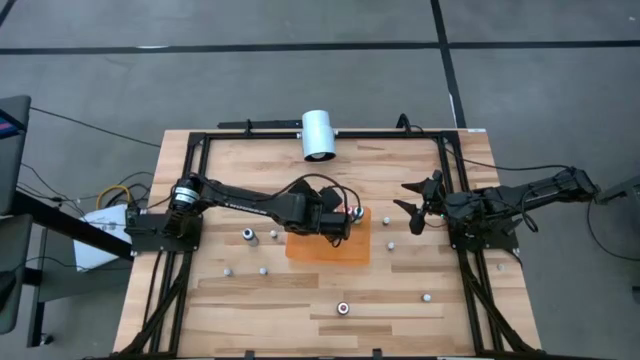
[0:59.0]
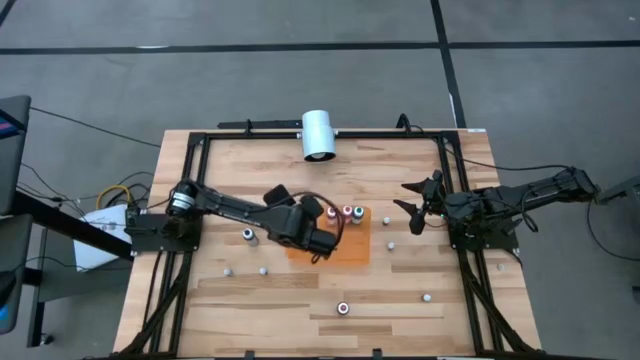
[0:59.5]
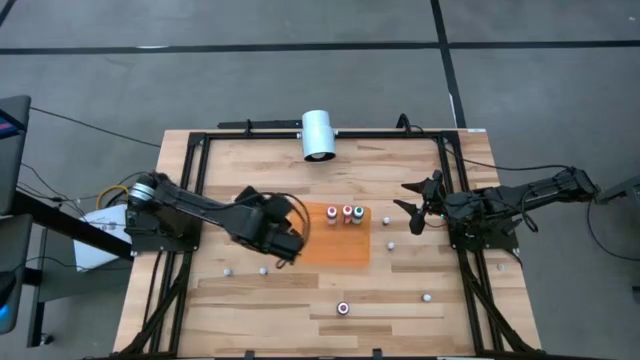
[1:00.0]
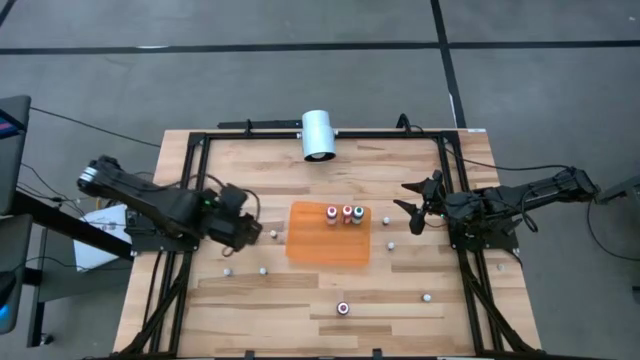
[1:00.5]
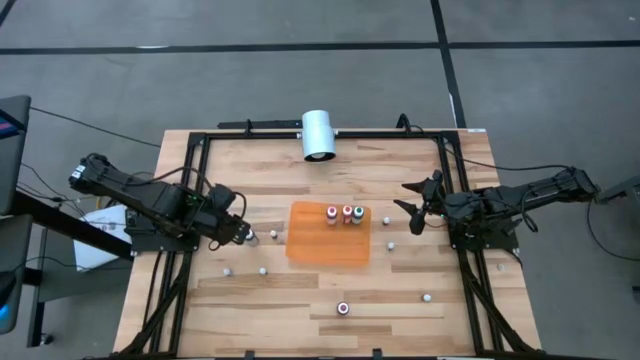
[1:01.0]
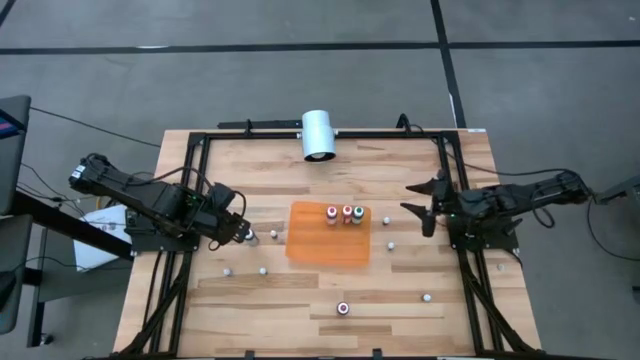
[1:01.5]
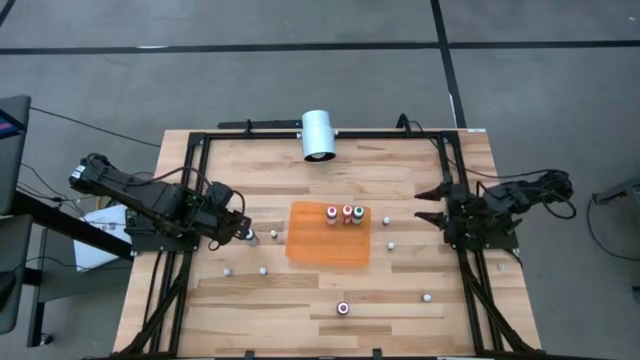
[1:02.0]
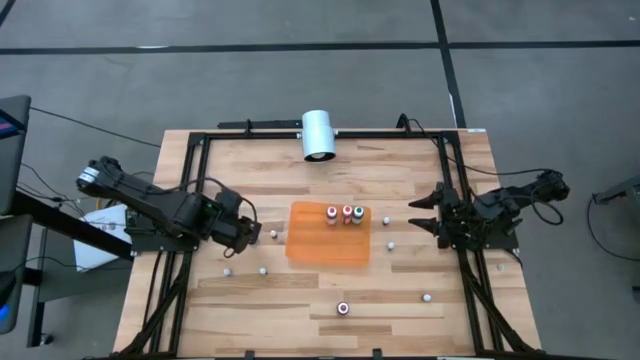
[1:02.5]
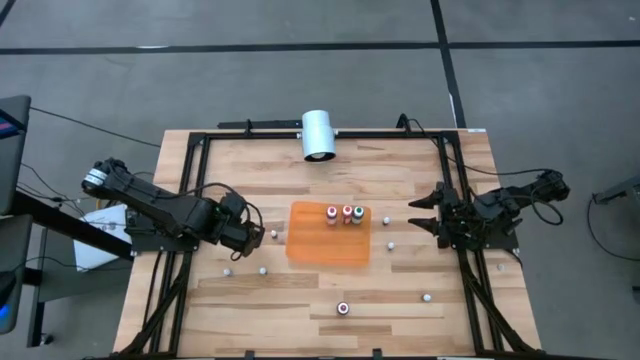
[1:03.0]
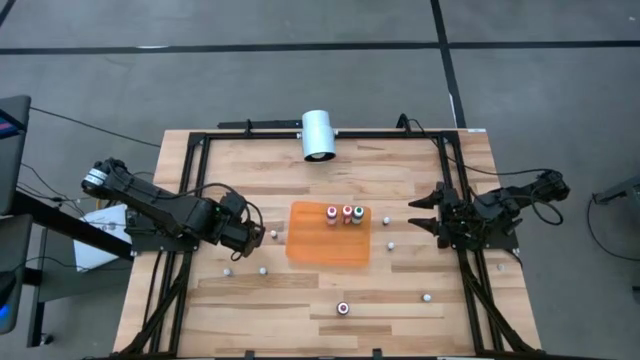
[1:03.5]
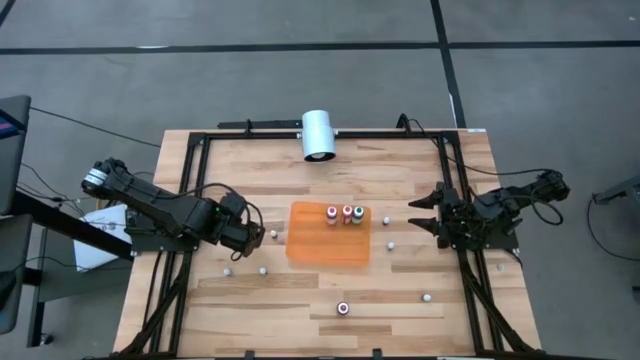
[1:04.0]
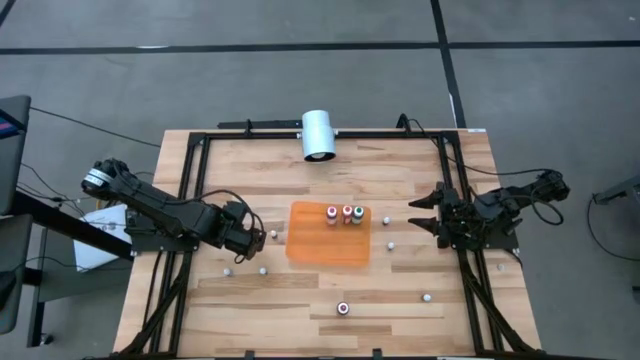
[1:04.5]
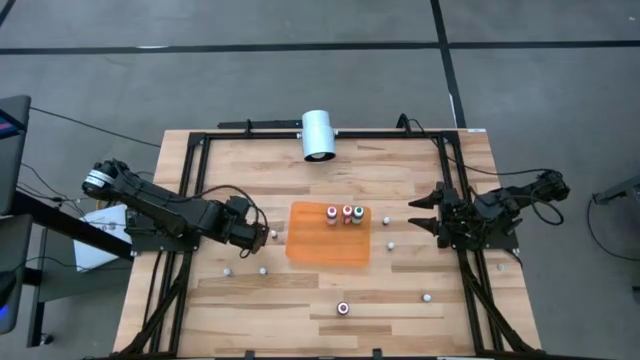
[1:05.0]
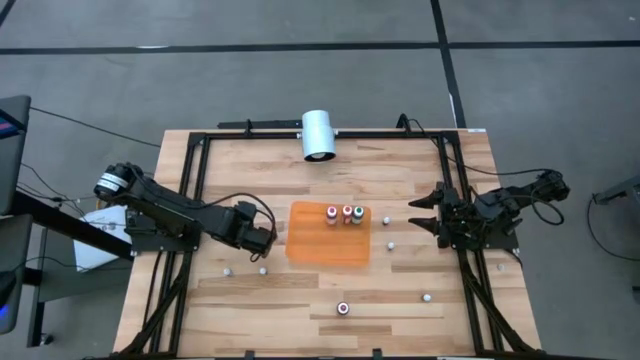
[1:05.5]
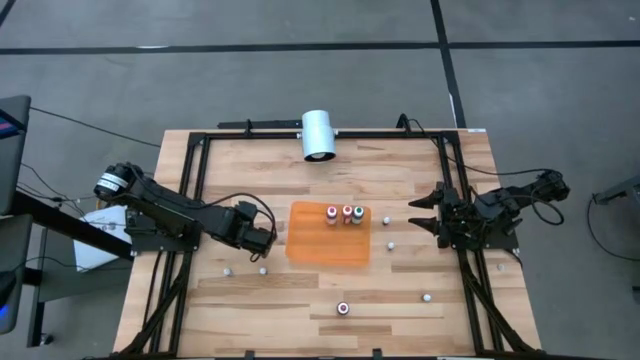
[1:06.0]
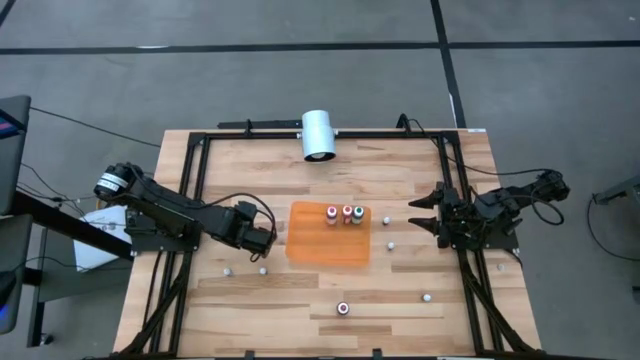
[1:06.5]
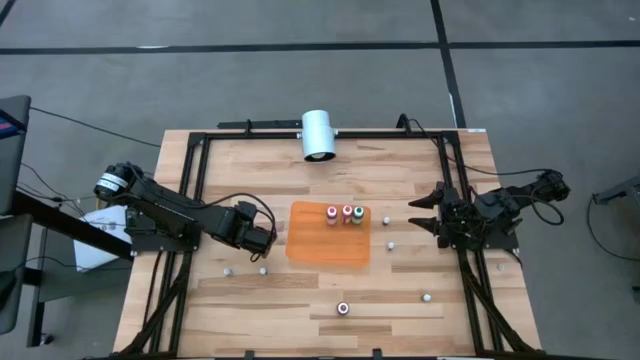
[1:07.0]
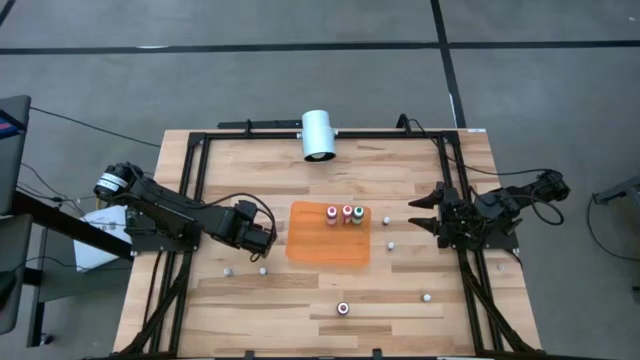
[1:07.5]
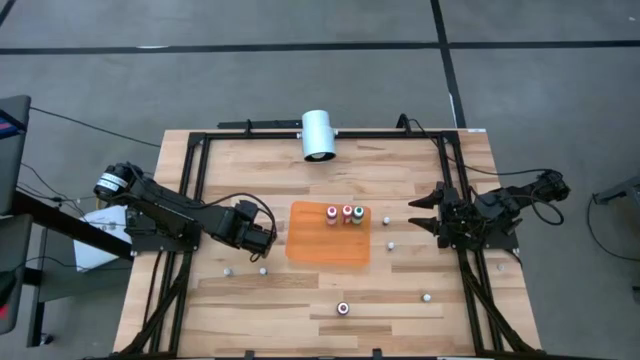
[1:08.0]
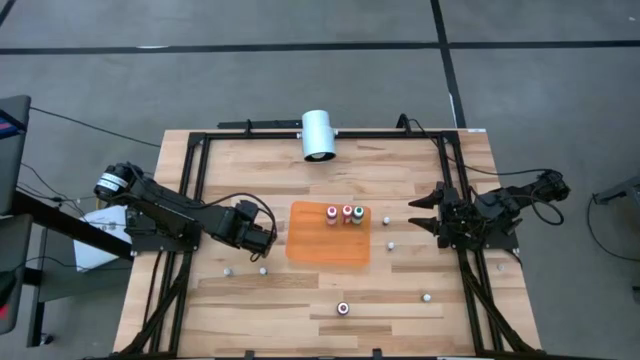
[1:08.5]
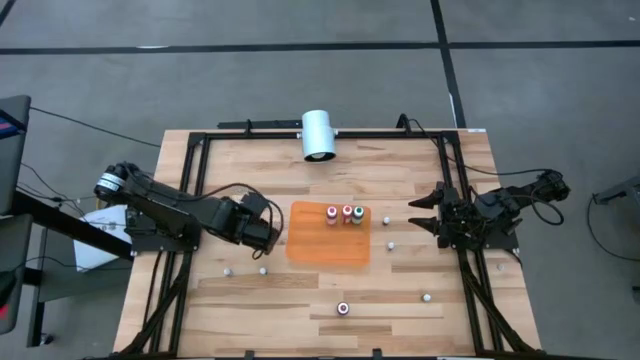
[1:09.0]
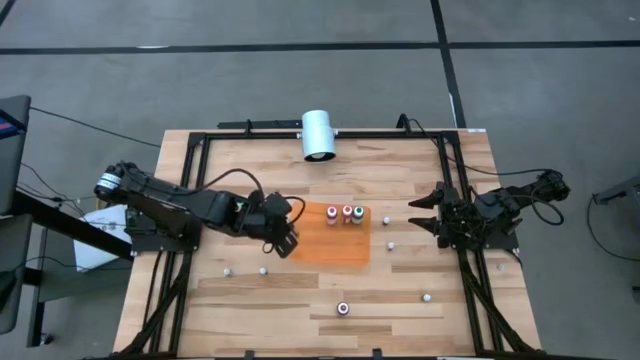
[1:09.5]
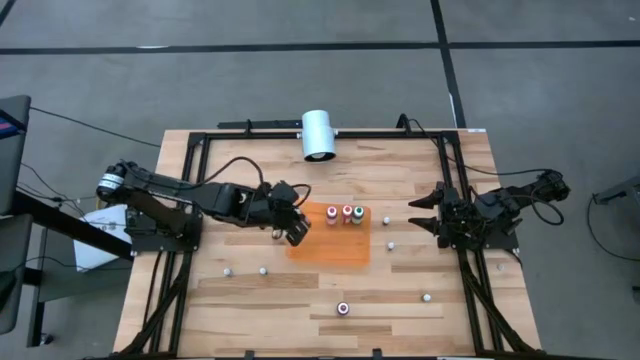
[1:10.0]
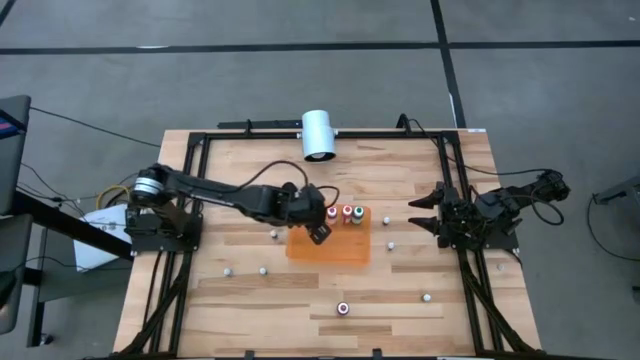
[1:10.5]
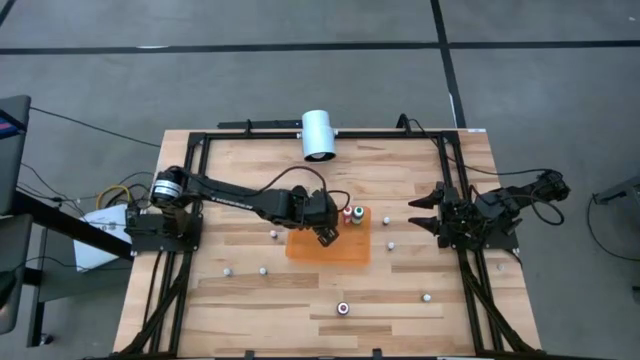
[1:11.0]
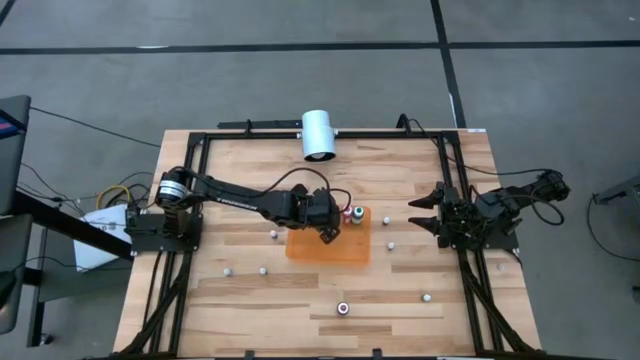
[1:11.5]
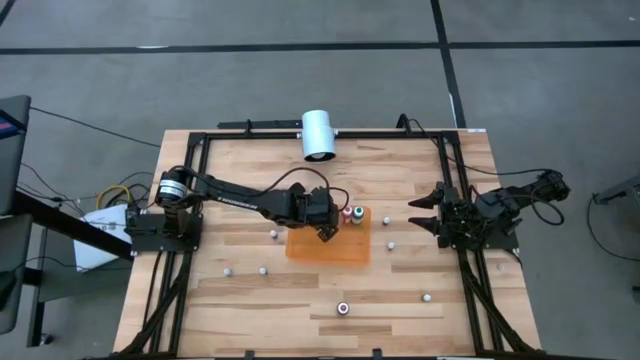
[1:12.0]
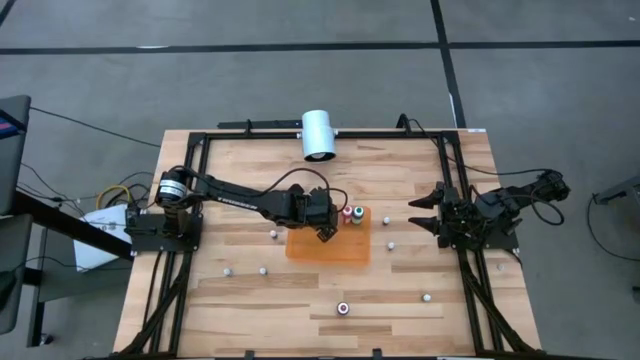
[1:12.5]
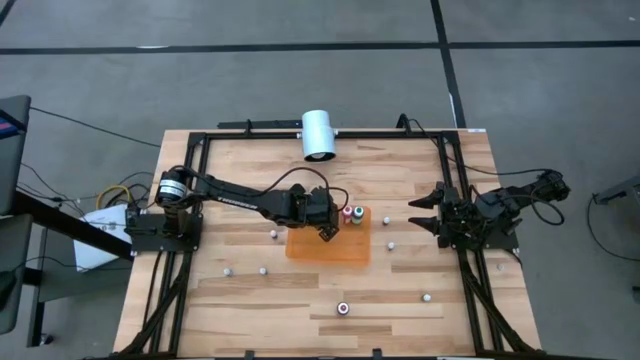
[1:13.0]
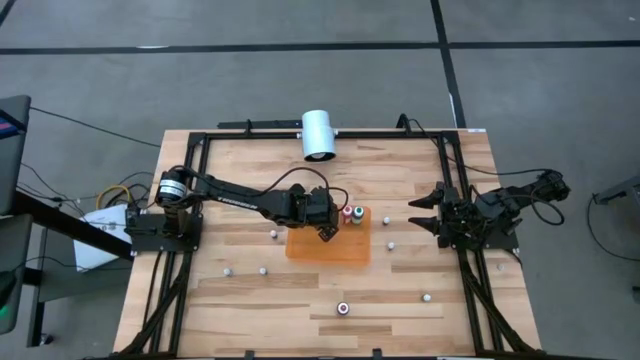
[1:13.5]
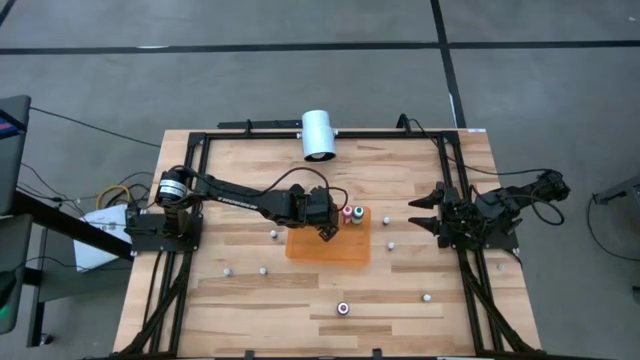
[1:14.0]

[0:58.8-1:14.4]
Task: Pick & Place food coloring
Put the large black food coloring into the orange bin

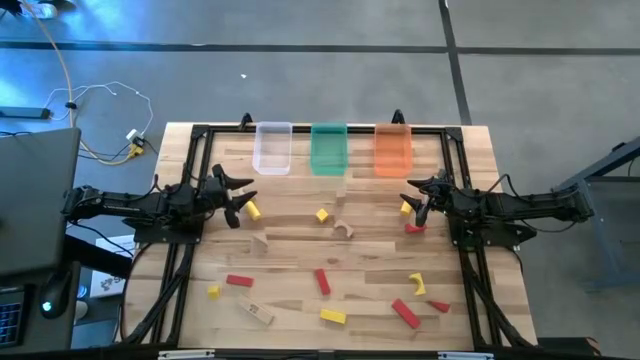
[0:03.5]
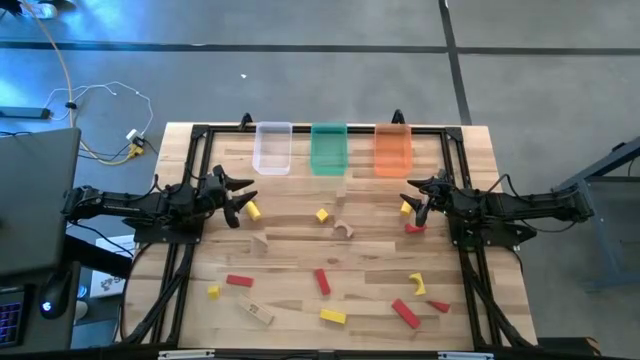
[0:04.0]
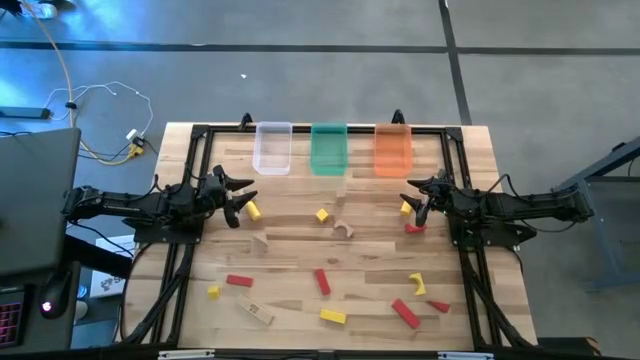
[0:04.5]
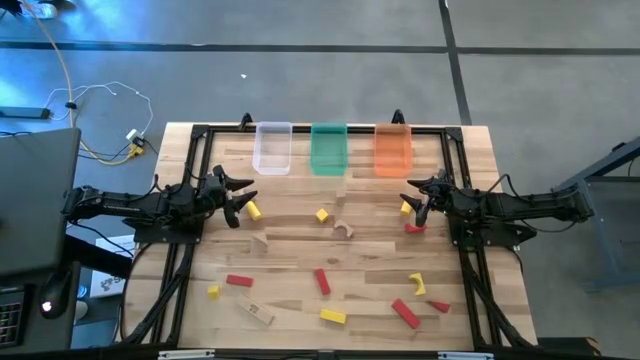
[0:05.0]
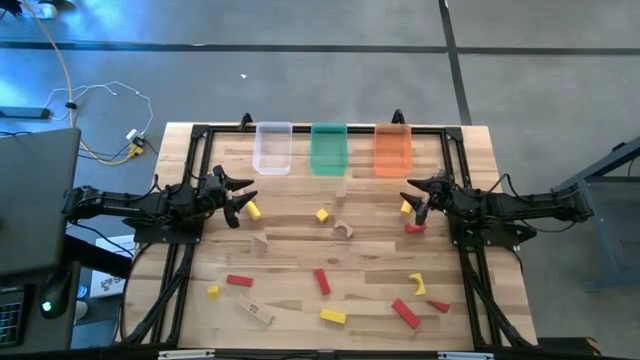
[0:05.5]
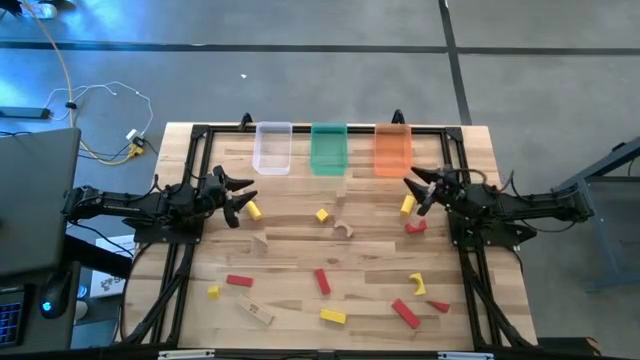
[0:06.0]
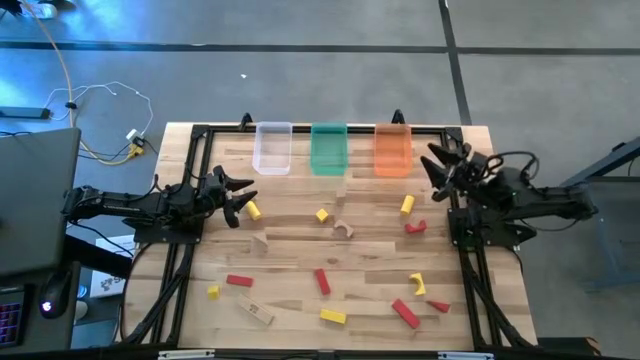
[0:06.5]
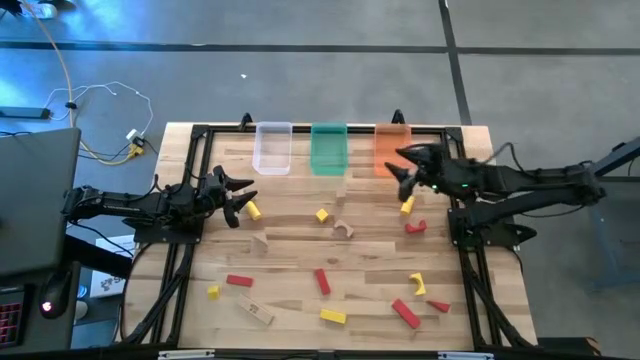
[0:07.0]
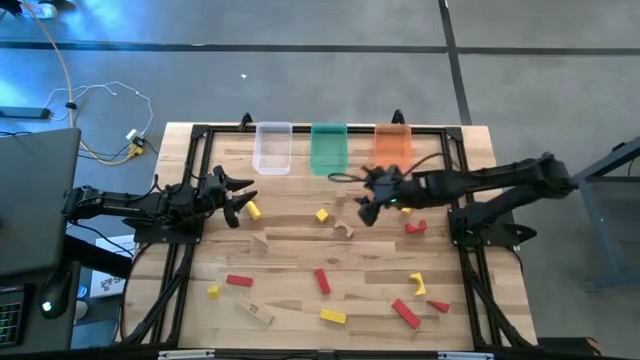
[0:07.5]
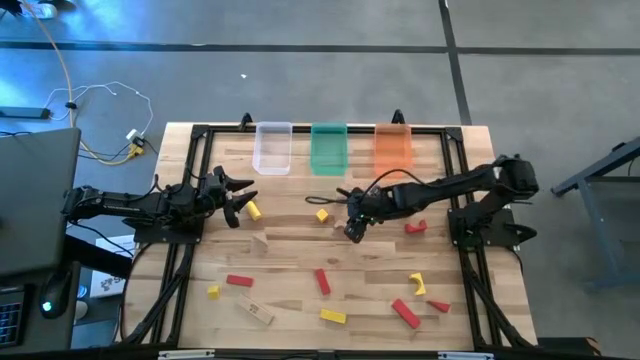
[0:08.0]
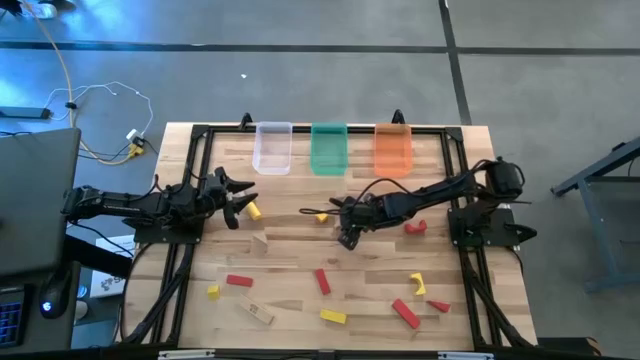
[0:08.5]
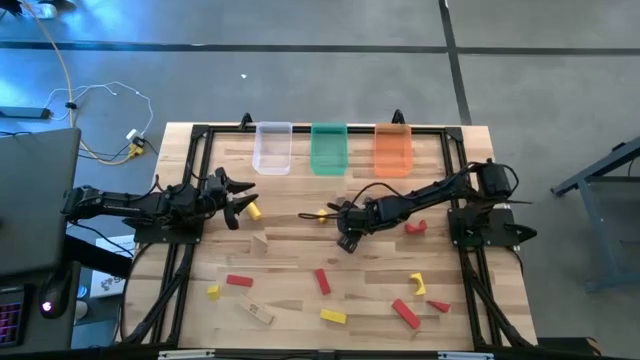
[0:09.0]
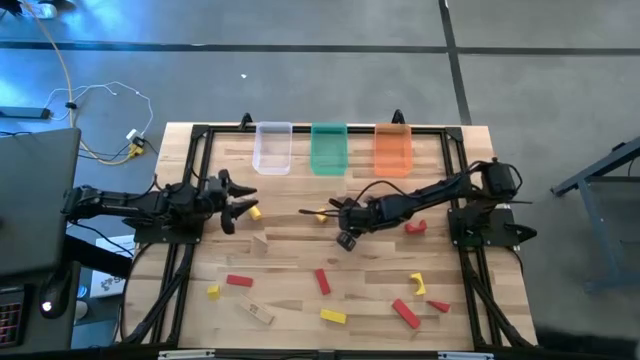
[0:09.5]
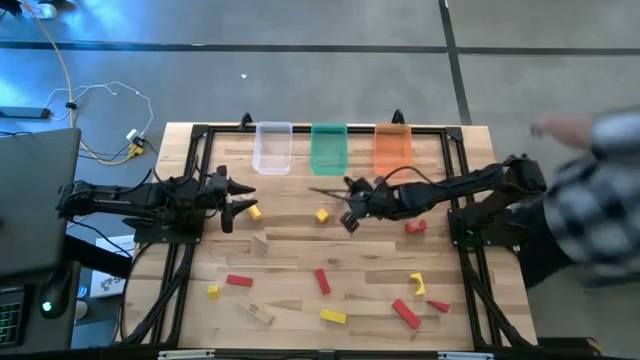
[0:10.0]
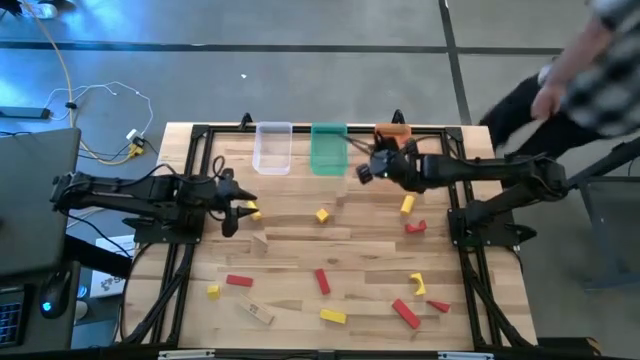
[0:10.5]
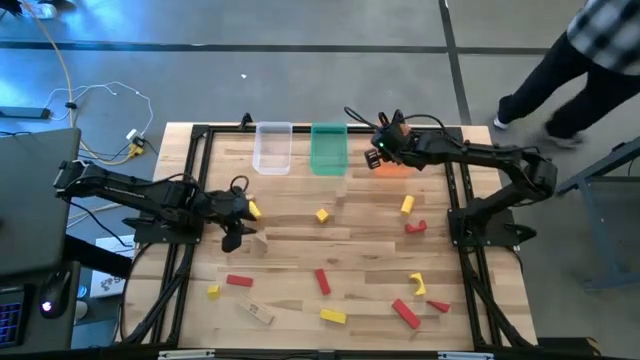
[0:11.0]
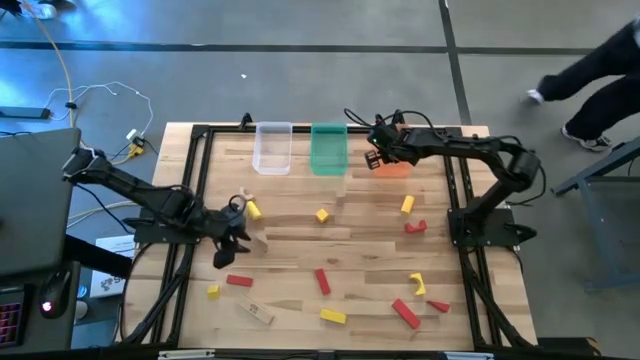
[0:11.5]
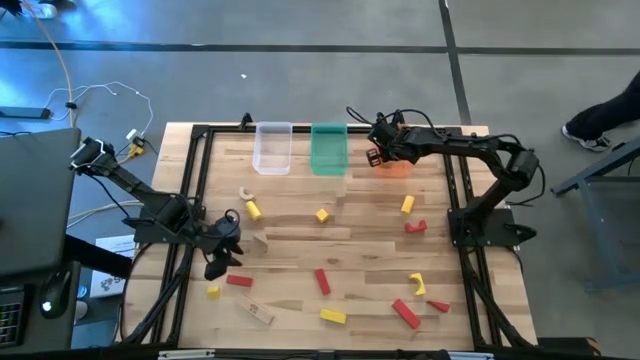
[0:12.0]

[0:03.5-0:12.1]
Task: Sort & place blocks by color
Put the brown block into the orange bin
